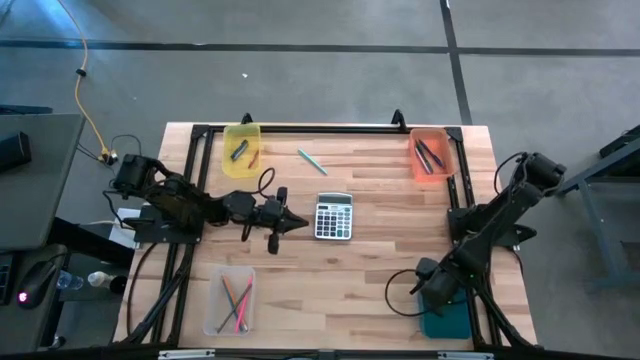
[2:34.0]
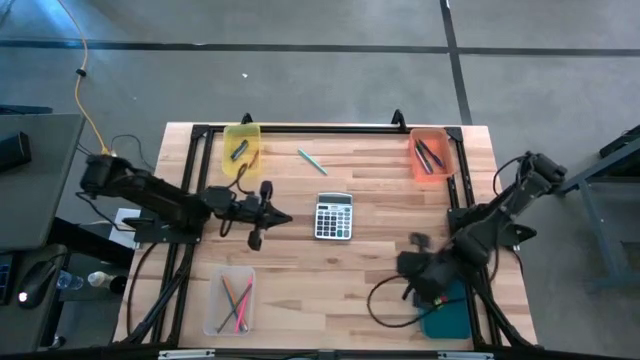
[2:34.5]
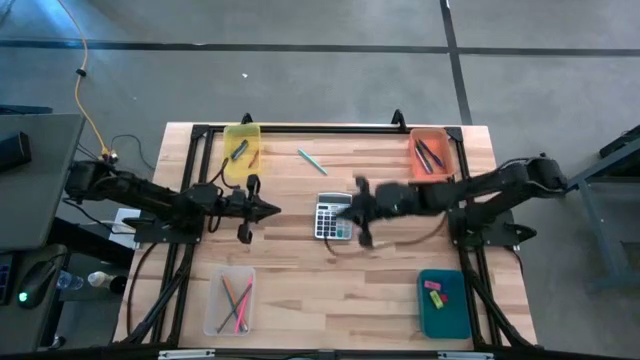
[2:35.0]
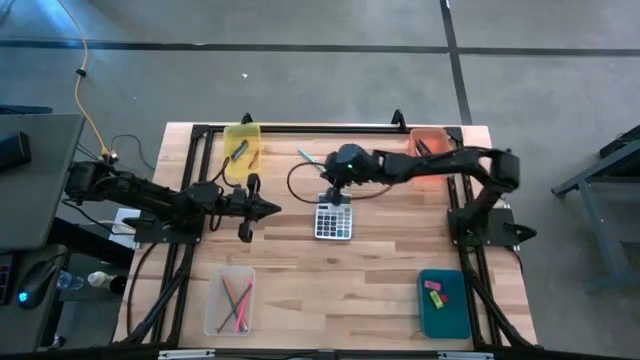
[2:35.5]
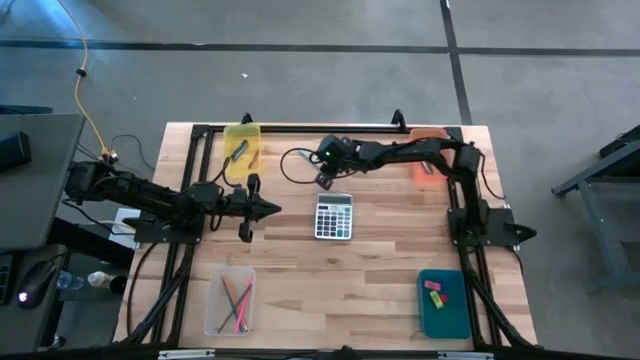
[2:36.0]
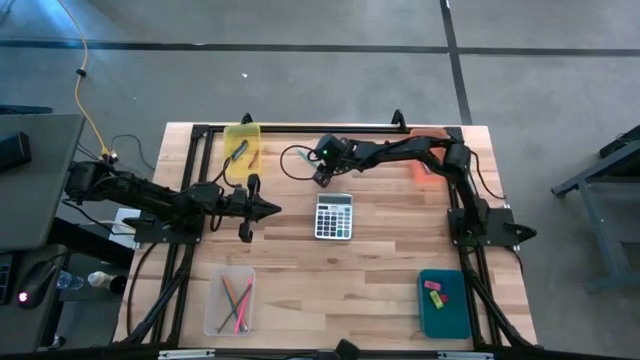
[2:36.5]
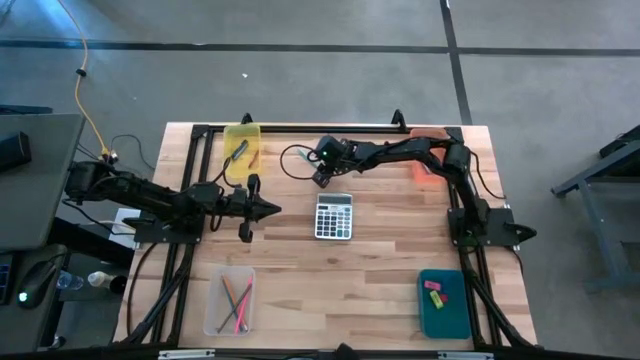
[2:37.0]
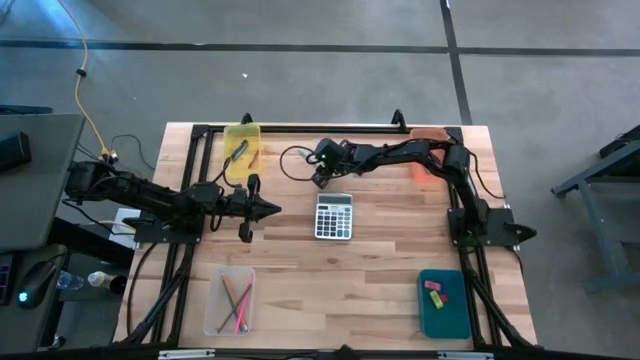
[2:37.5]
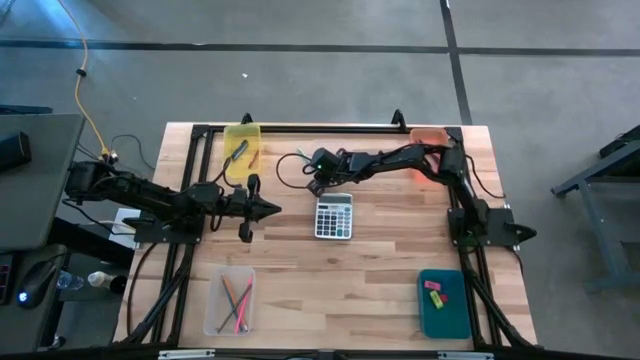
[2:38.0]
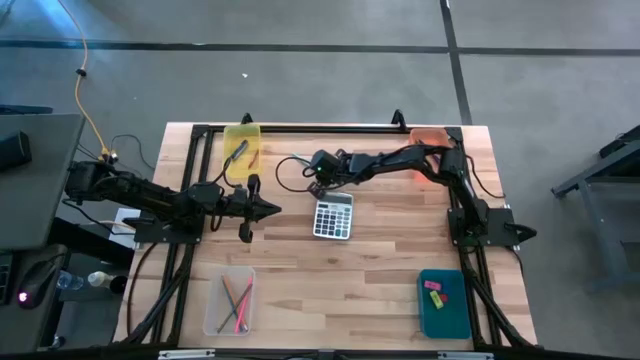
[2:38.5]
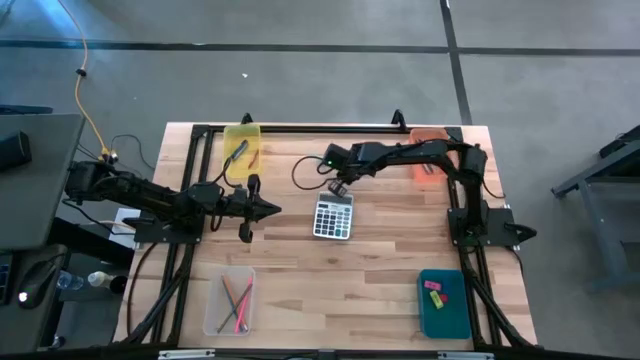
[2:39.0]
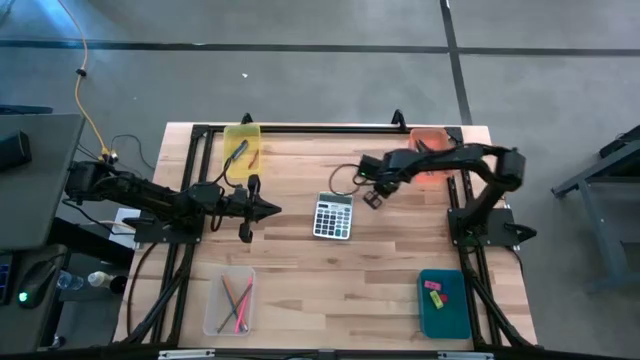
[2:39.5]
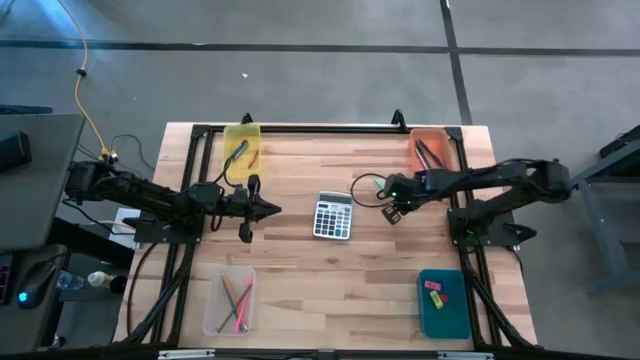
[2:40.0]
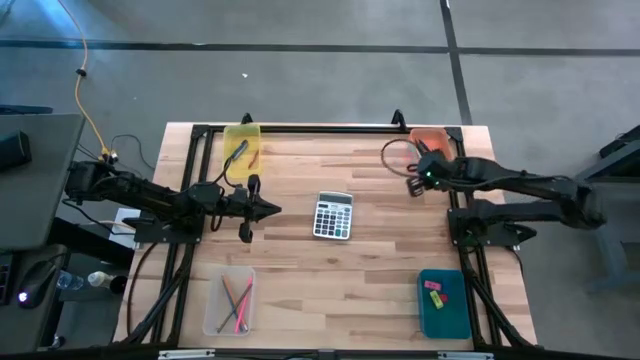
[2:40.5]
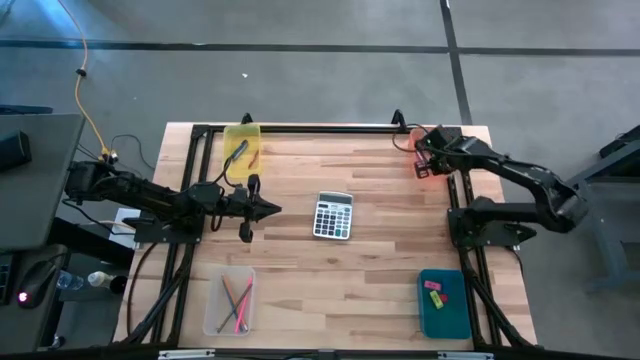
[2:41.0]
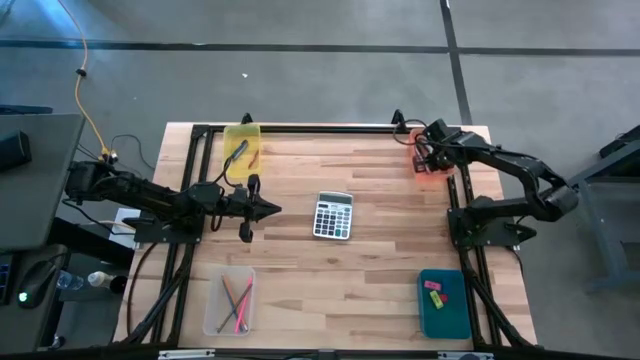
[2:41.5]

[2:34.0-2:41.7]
Task: Sort crayons/erasers/pens/pencils in bins
Put the light blue pen into the orange bin

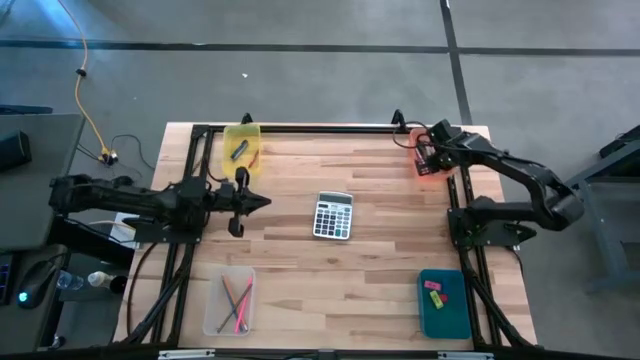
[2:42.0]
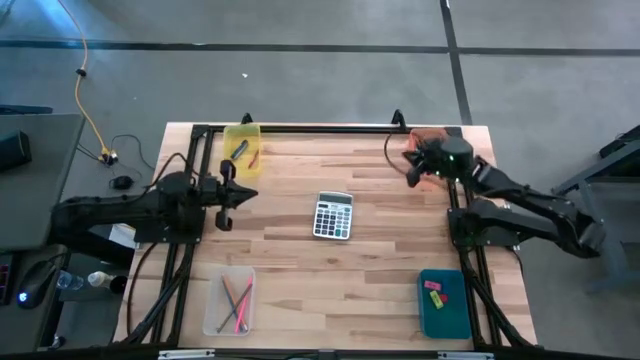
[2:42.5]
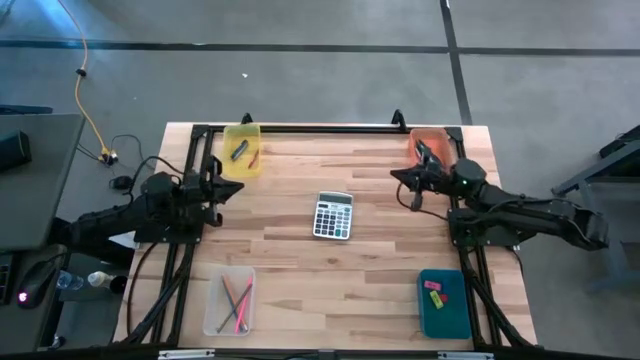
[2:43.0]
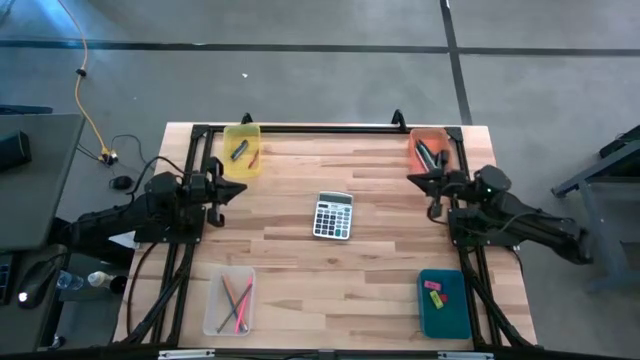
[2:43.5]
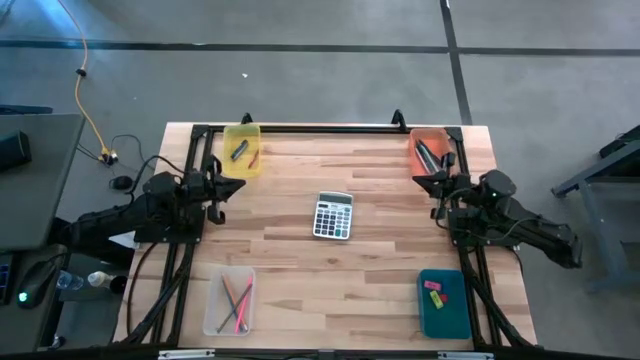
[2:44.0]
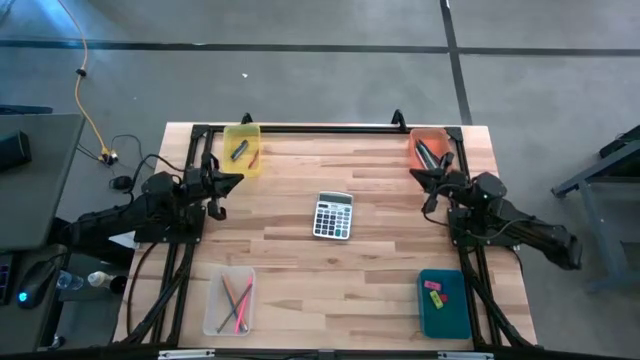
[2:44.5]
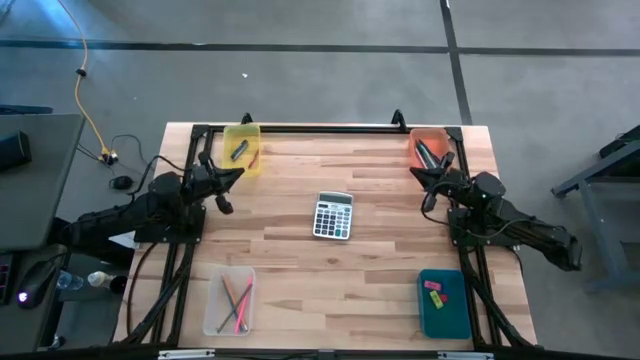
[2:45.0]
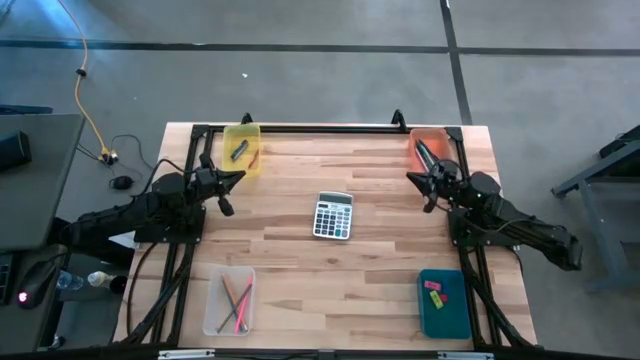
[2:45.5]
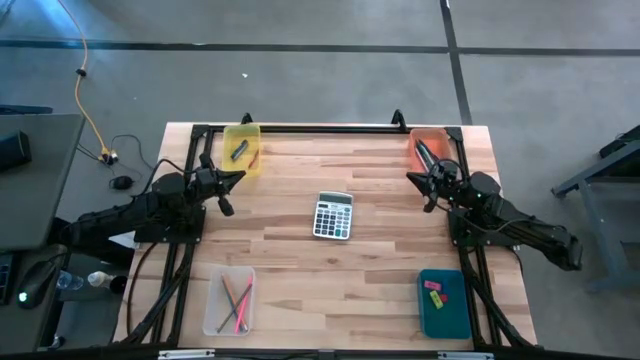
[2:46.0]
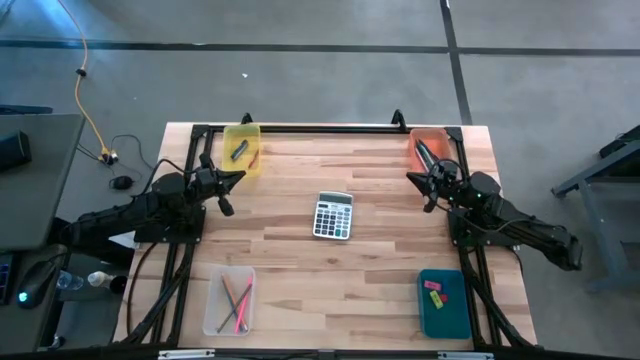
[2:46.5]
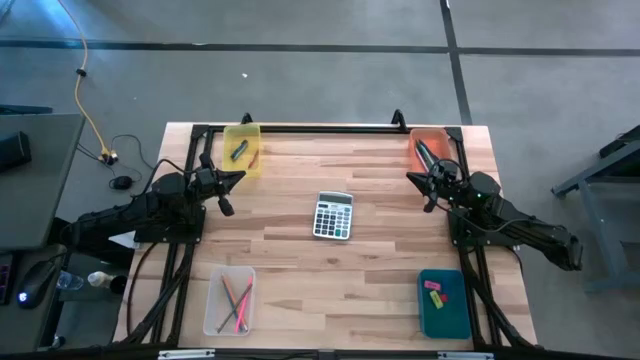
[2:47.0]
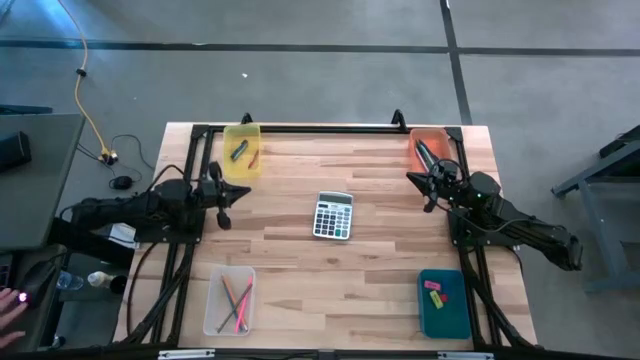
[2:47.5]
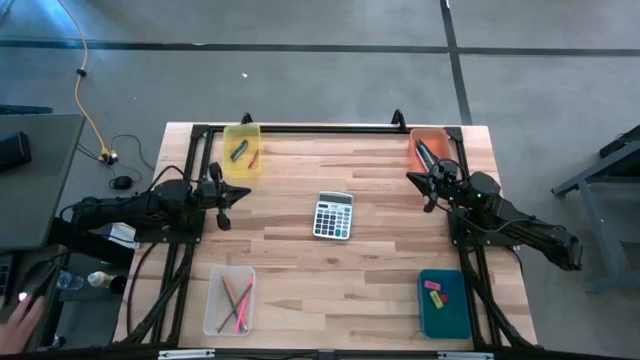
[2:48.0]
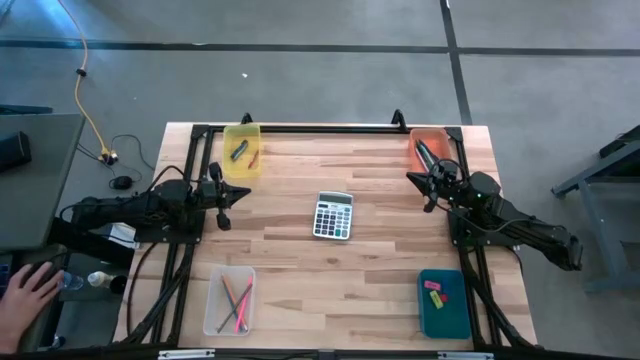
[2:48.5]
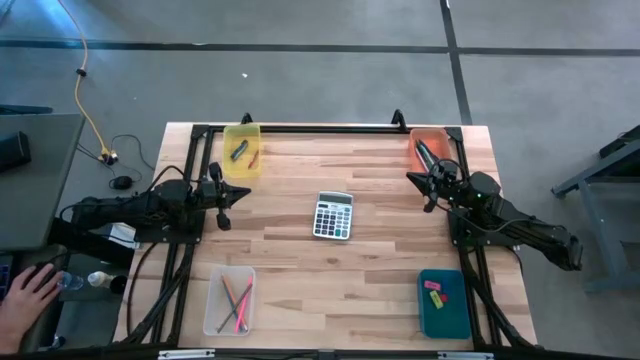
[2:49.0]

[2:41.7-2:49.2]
Return to Home Position

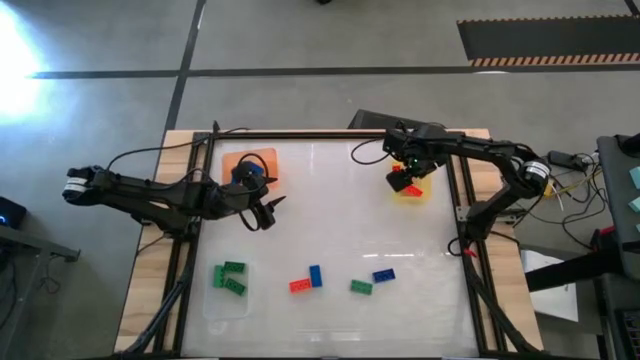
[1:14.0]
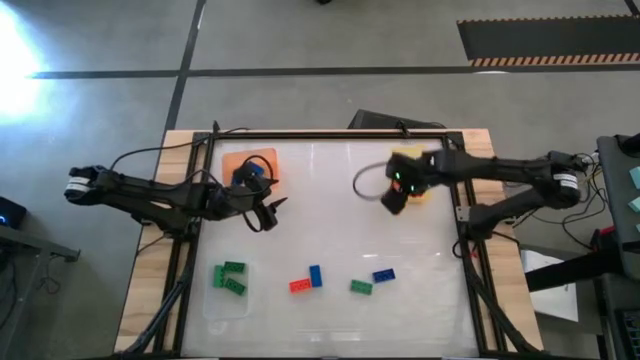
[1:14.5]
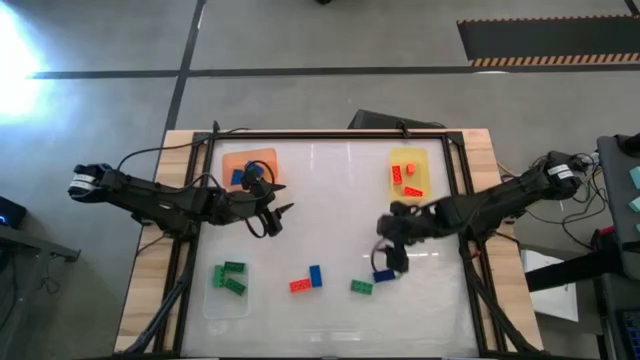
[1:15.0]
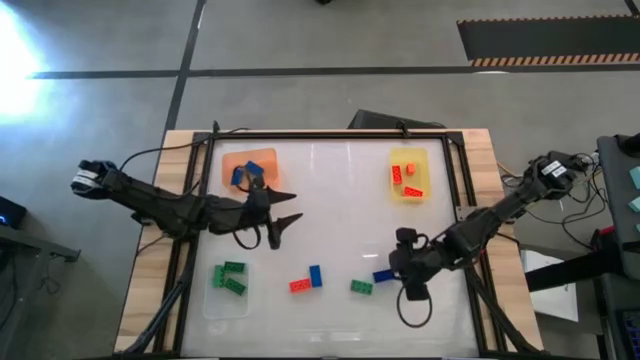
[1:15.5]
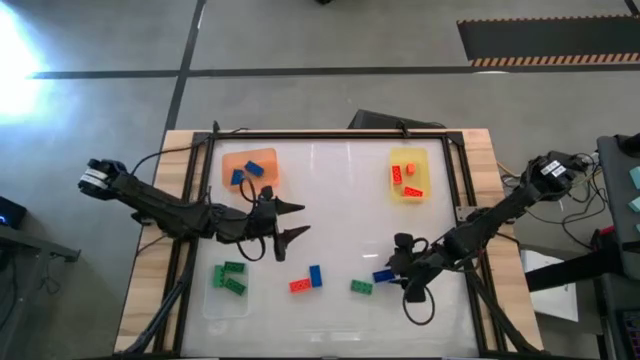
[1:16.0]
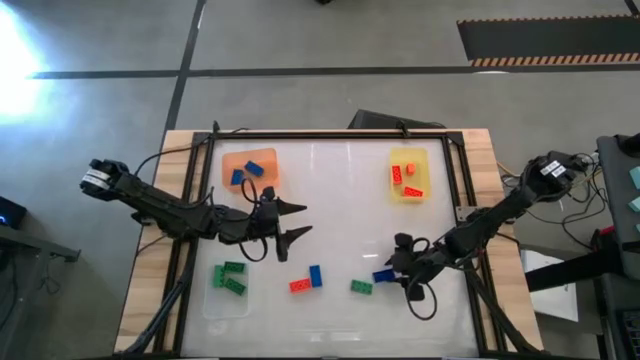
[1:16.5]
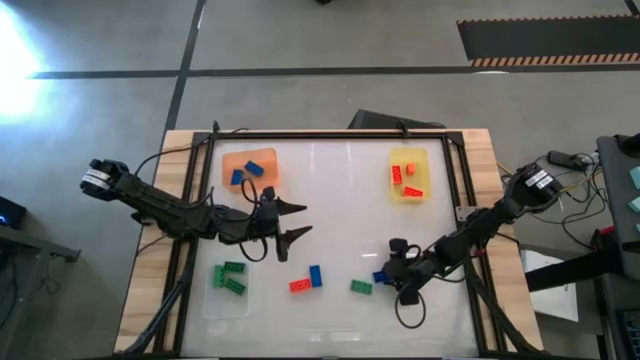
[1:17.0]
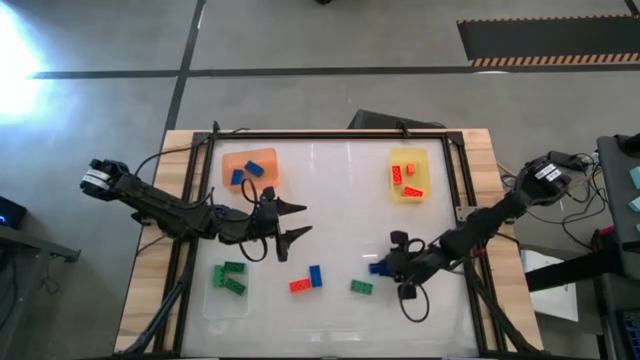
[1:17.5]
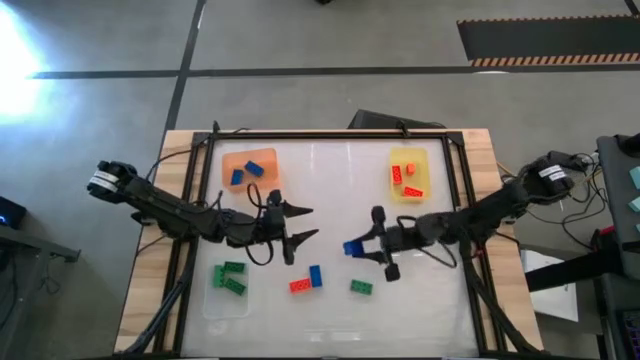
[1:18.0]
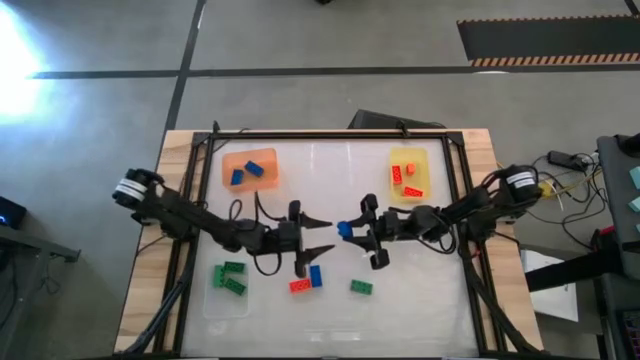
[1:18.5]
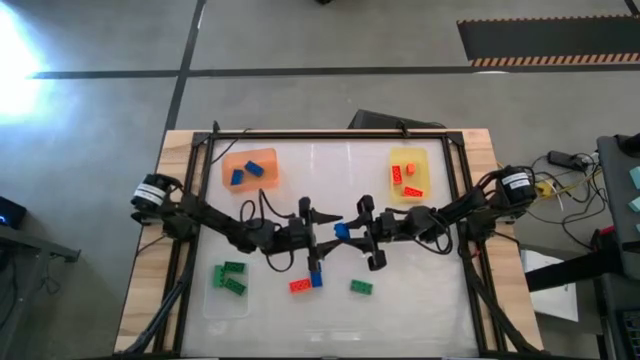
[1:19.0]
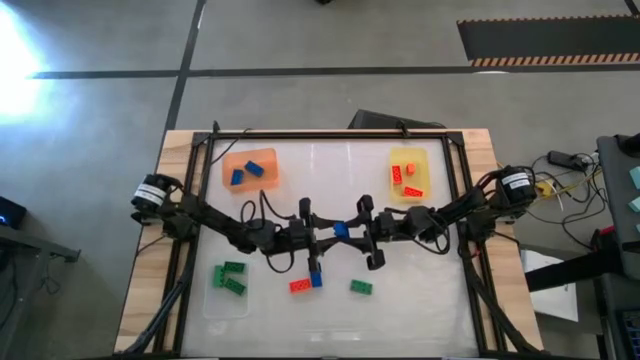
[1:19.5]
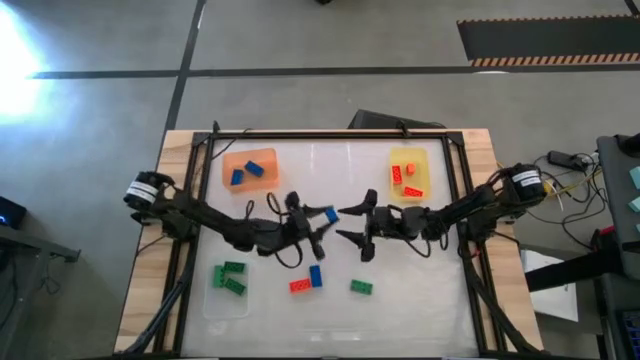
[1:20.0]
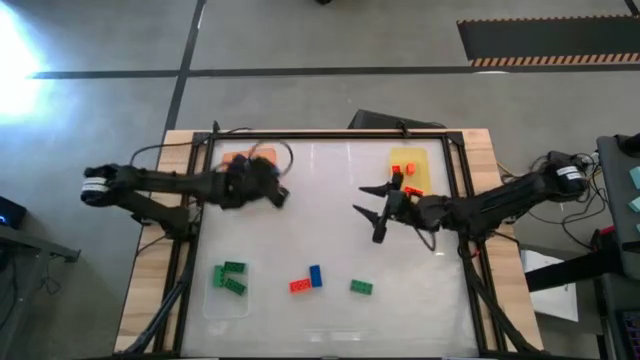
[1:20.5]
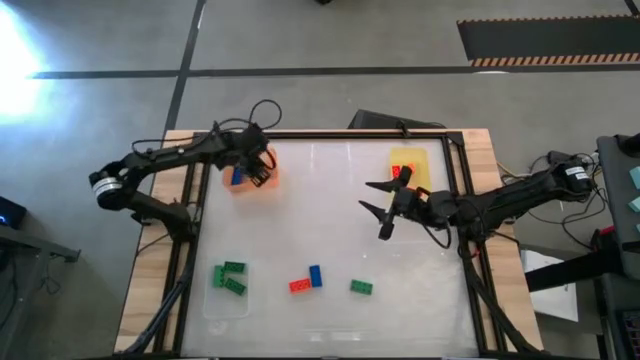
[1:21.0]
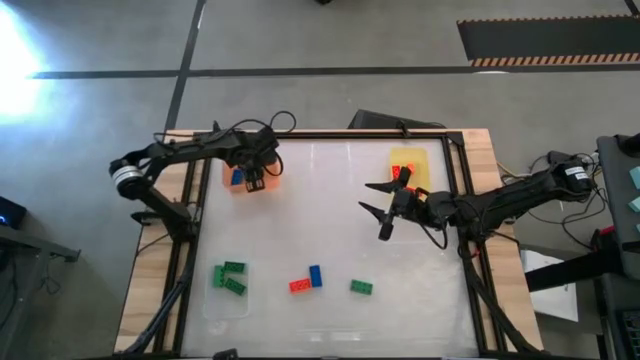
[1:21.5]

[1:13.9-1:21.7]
Task: Sort & place blocks by color
Put the blue game piece into the orange bin
